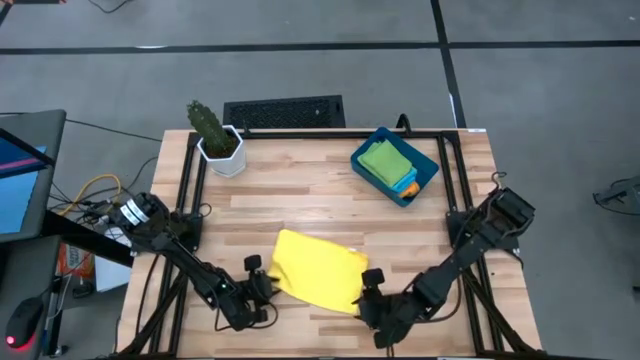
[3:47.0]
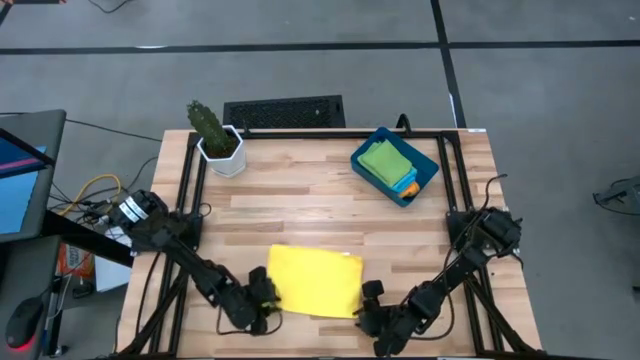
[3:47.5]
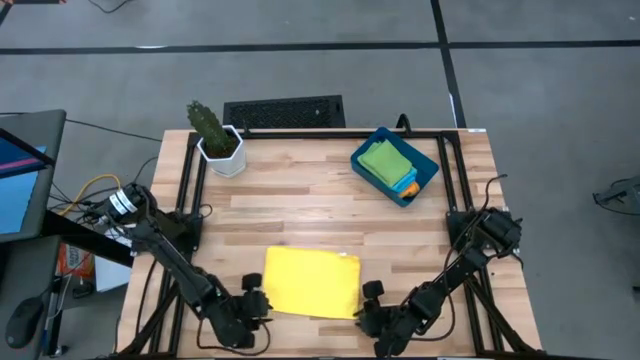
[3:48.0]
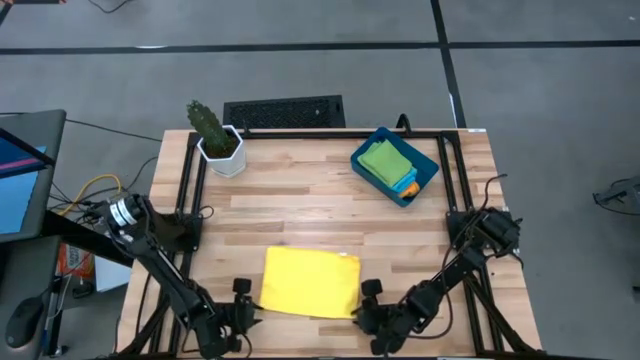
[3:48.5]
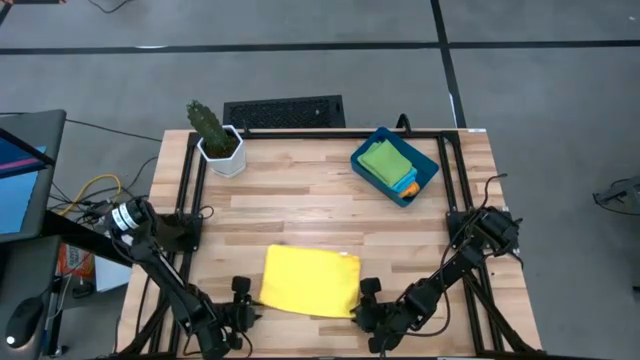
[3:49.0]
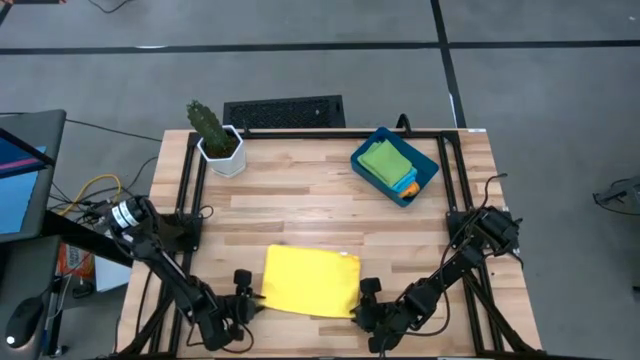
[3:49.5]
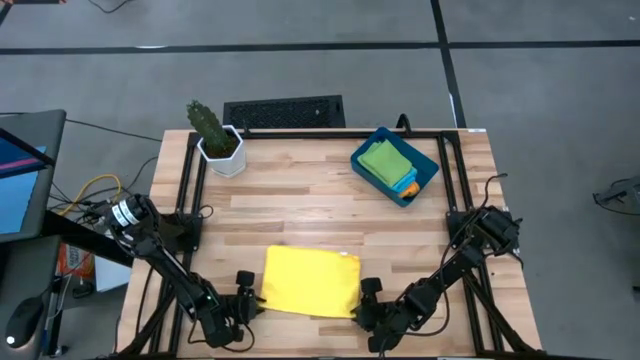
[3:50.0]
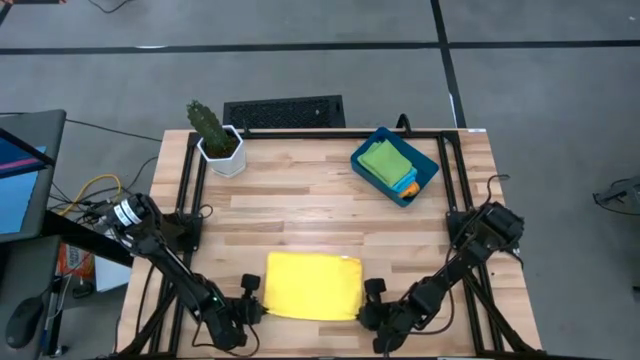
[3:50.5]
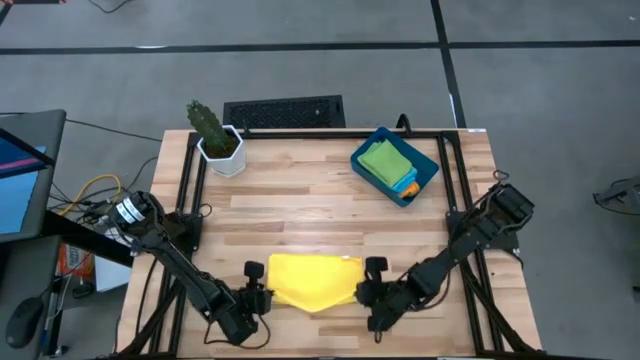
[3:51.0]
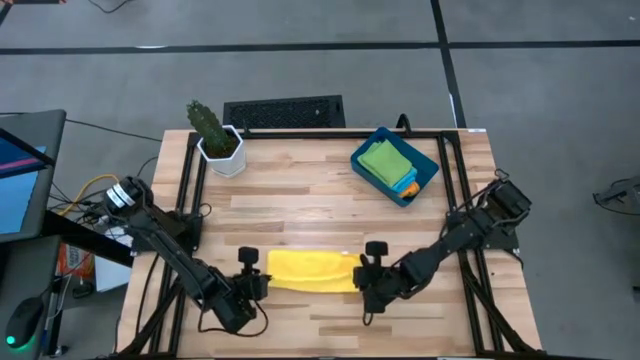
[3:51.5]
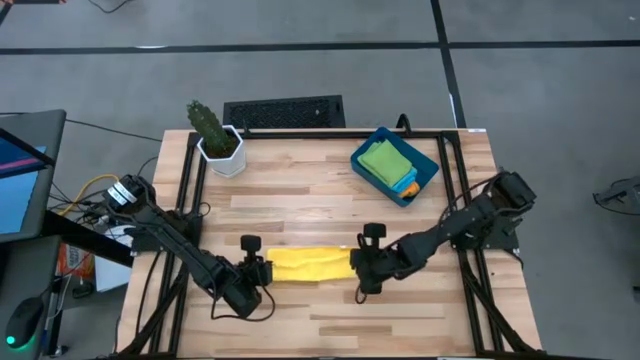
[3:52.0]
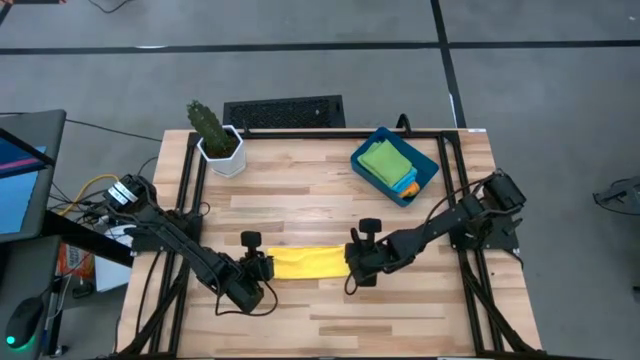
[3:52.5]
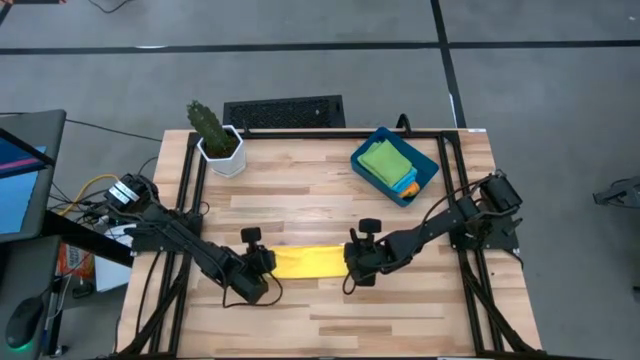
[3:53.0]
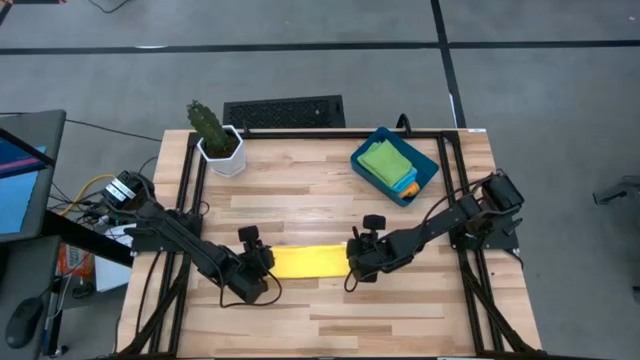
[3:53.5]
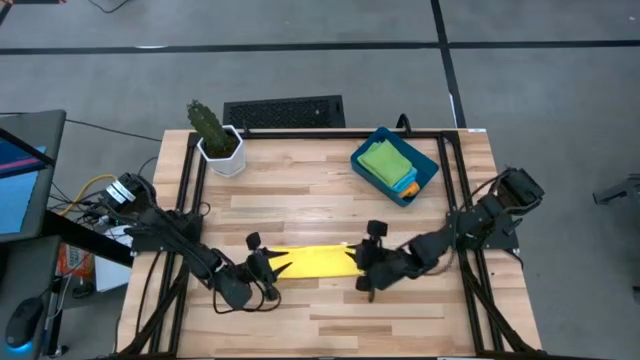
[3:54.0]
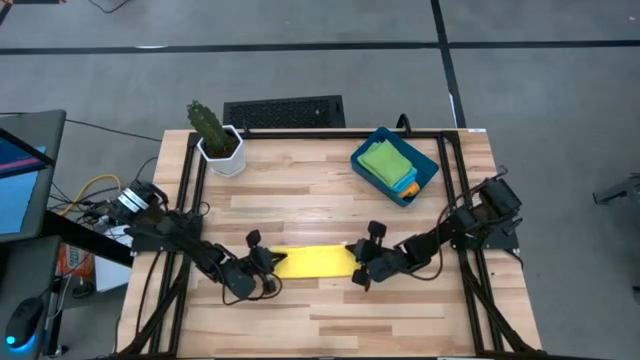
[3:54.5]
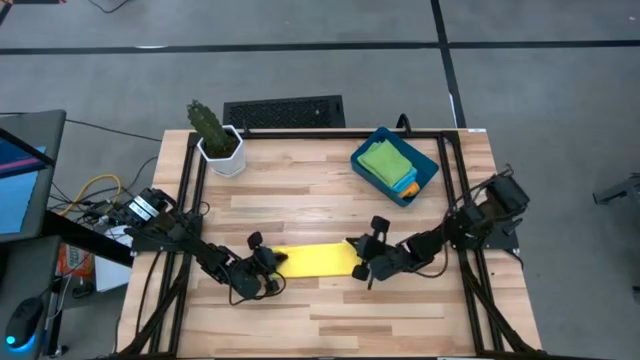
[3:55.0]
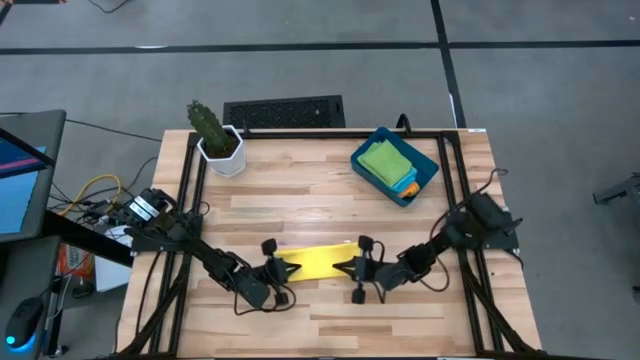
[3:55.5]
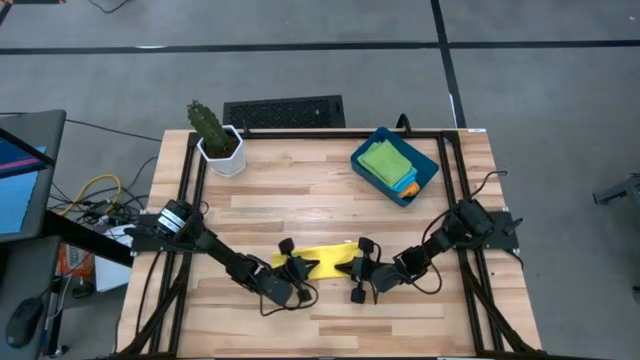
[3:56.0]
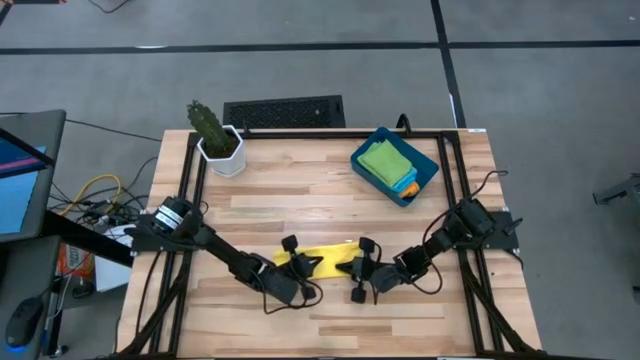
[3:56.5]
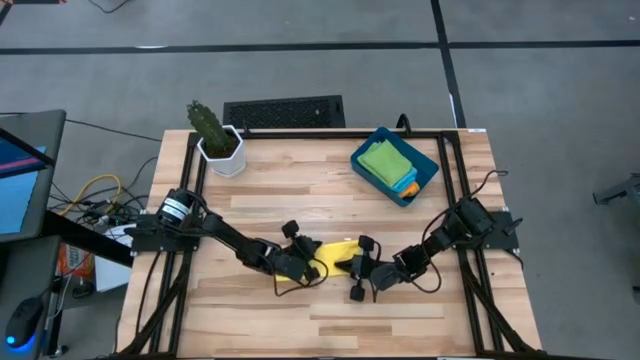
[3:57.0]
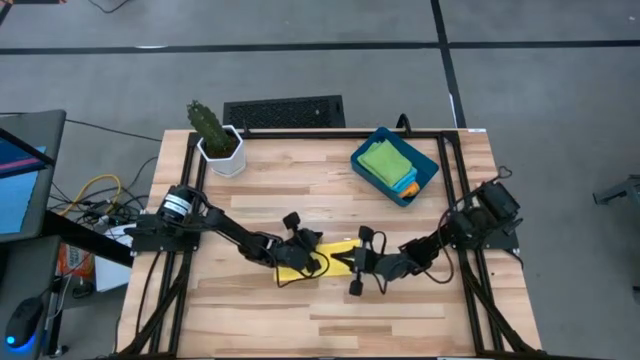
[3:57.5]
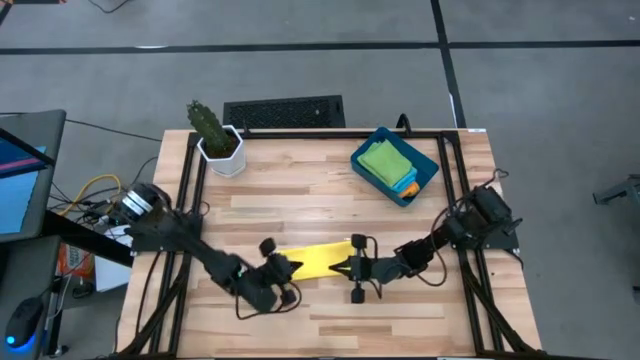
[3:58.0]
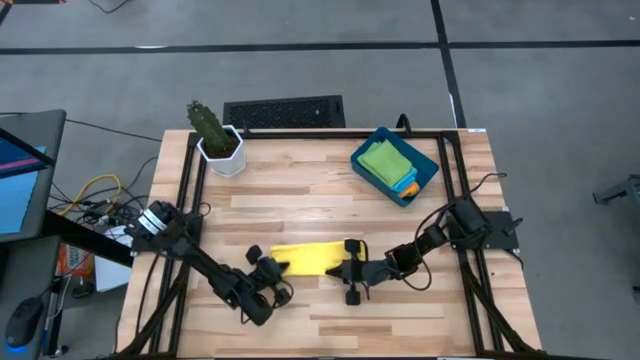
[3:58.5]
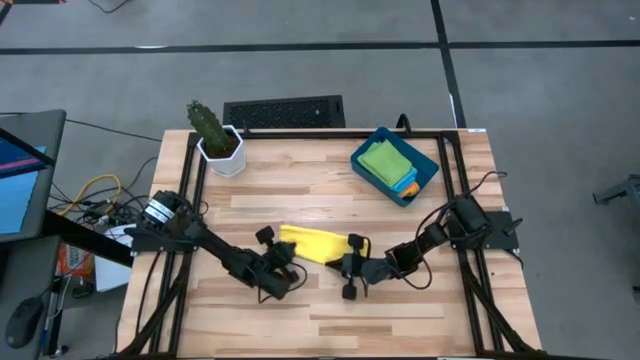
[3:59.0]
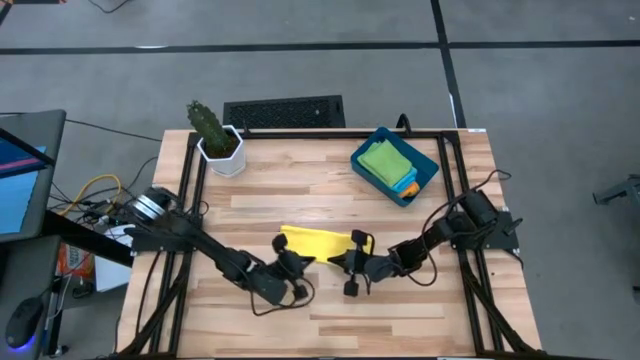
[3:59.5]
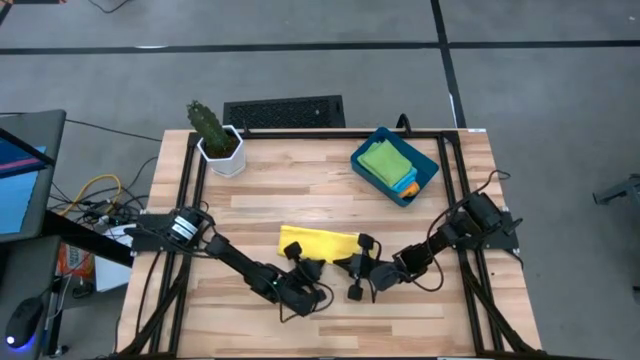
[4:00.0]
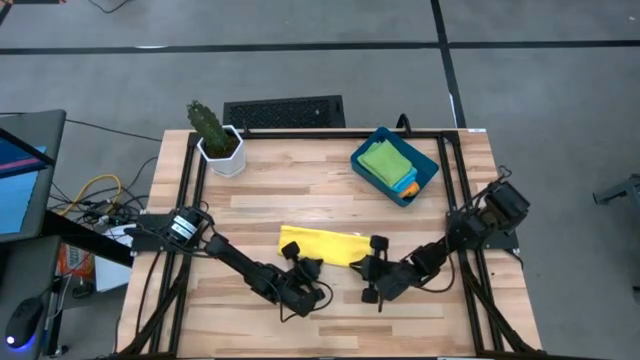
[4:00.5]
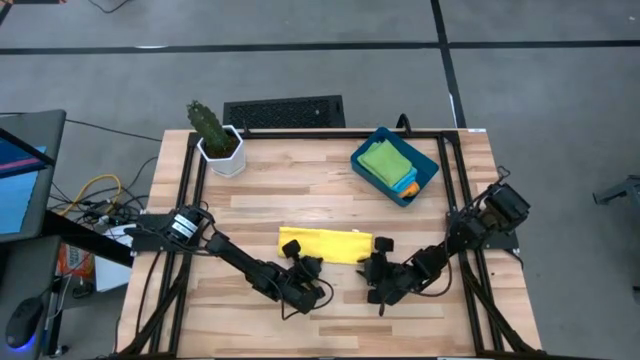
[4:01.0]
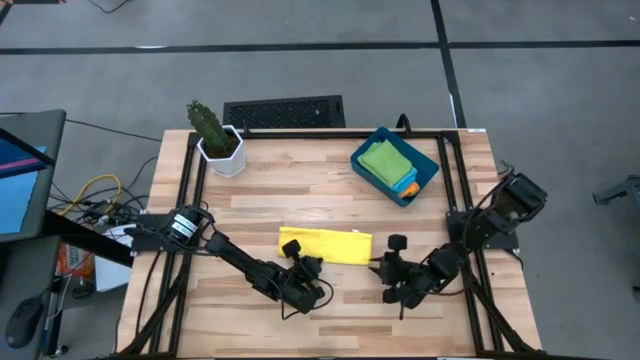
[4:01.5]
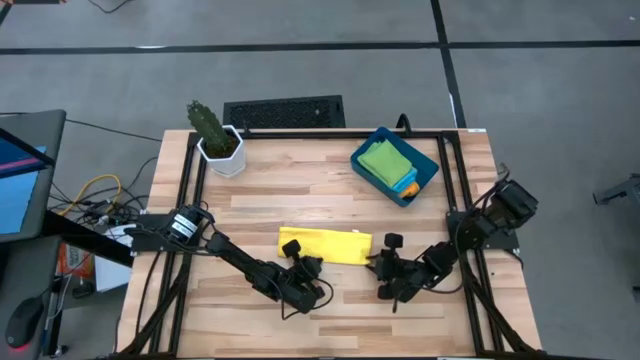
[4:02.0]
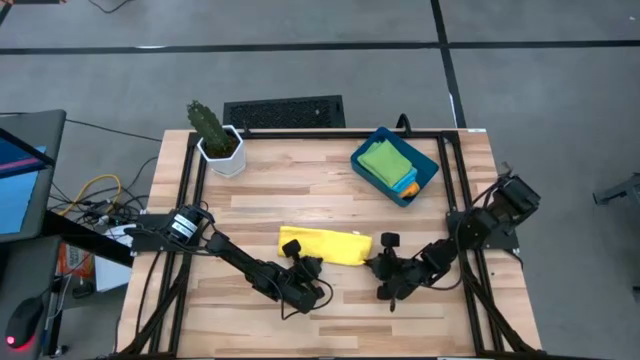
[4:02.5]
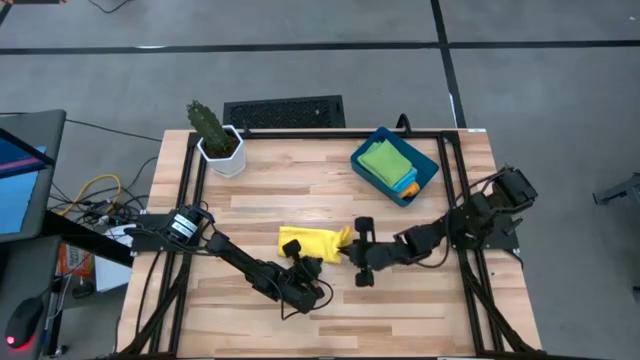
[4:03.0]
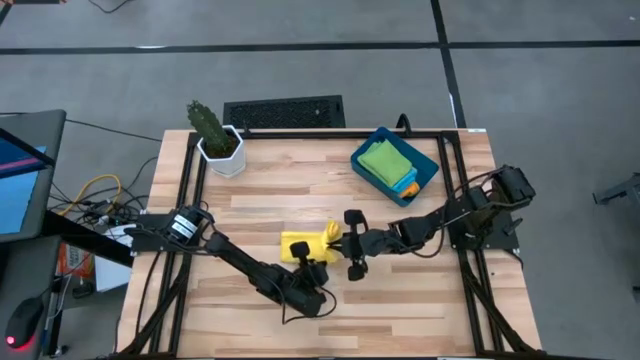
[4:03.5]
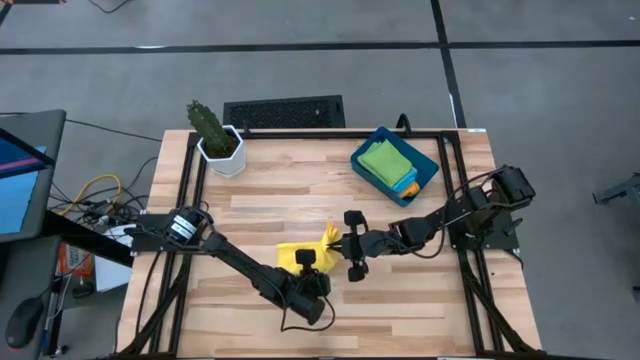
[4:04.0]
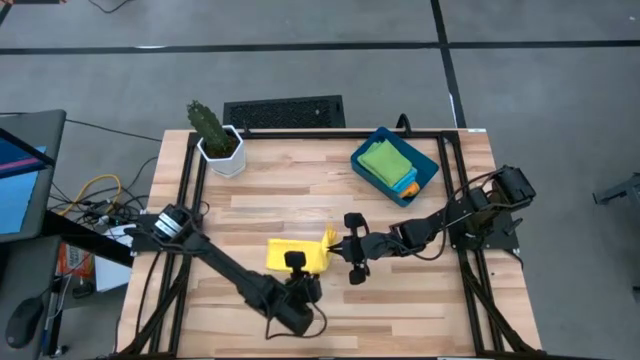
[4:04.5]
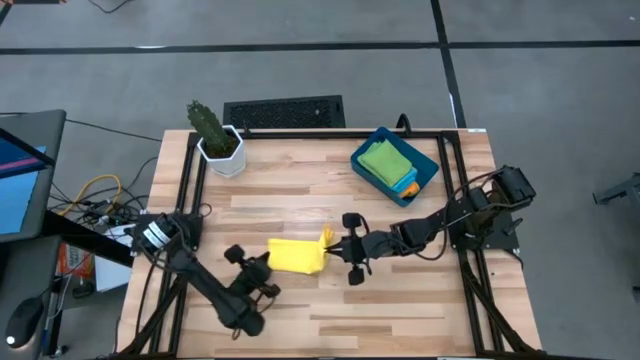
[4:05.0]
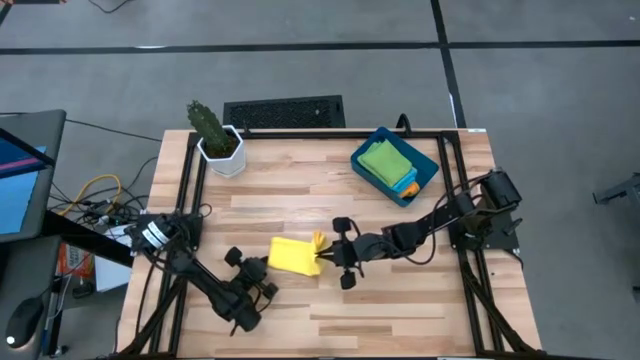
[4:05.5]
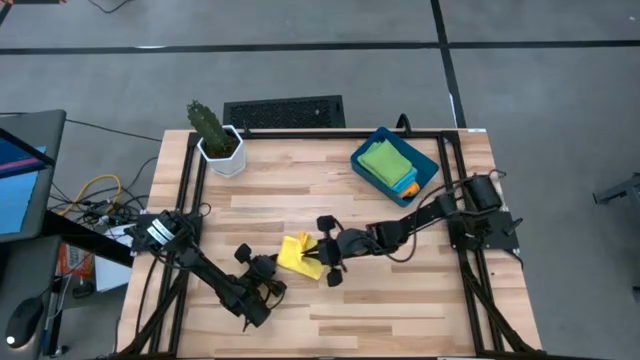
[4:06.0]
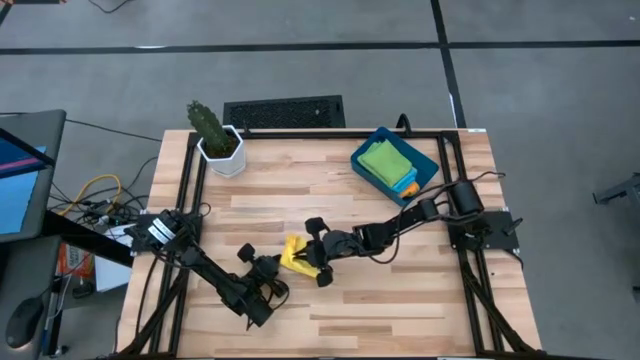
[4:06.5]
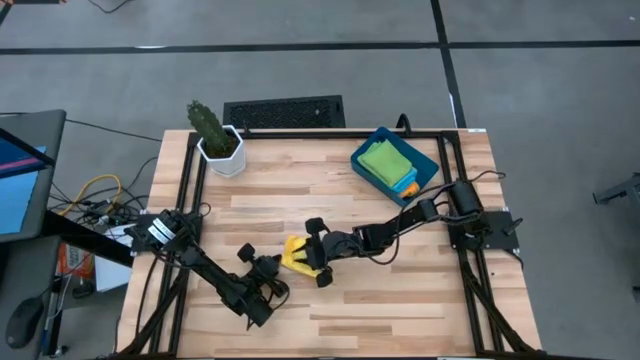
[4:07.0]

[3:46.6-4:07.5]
Task: Fold microfiber towels
Fold the yellow microfiber towel
